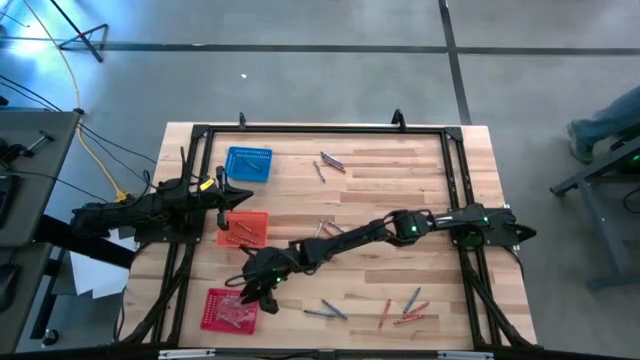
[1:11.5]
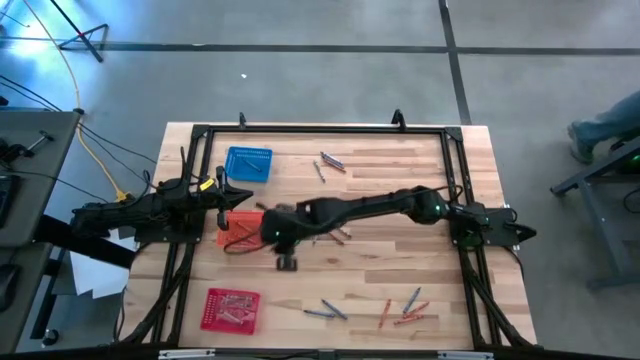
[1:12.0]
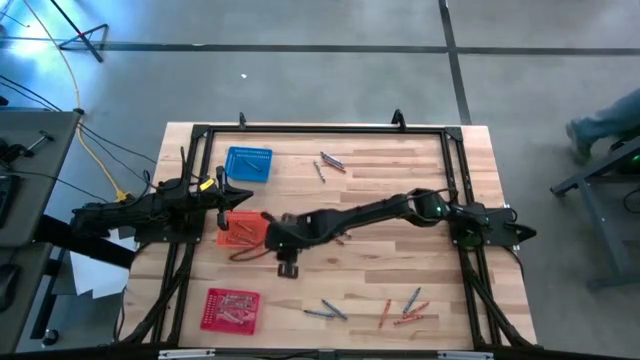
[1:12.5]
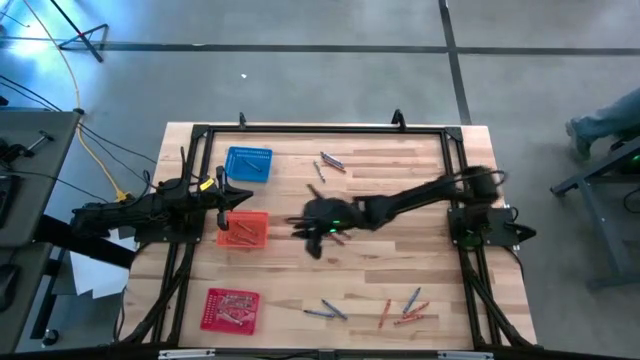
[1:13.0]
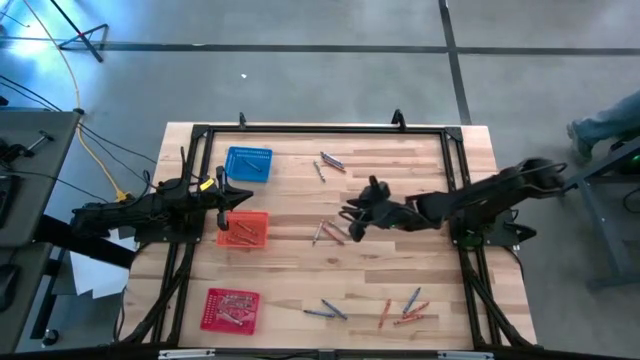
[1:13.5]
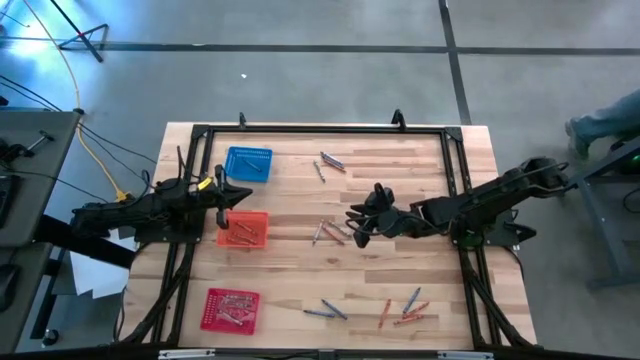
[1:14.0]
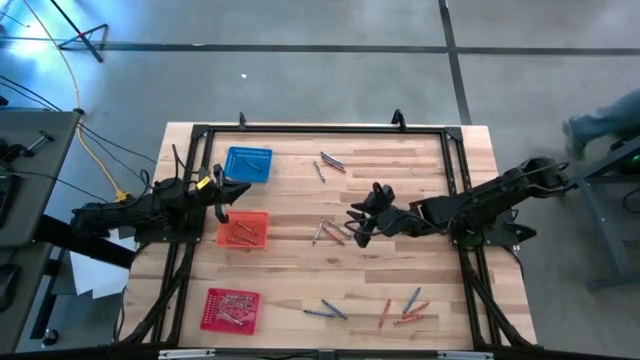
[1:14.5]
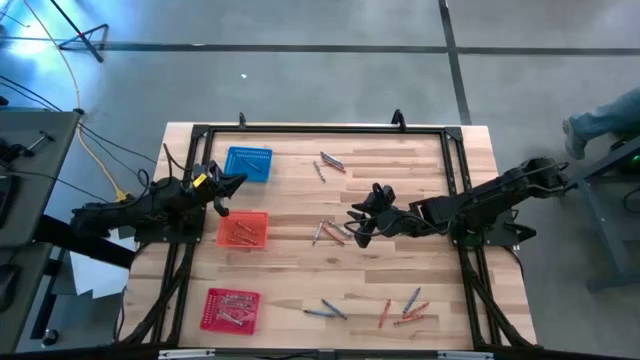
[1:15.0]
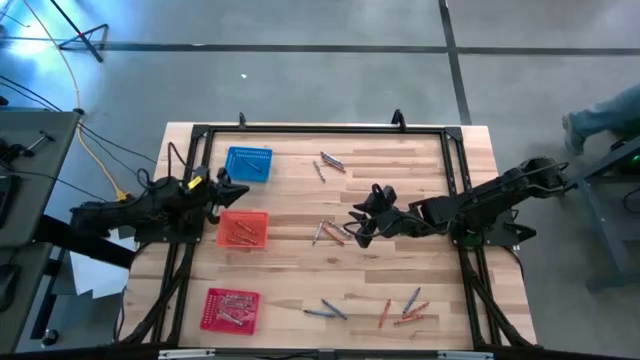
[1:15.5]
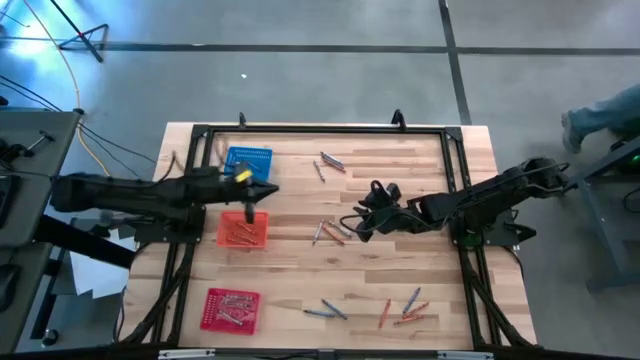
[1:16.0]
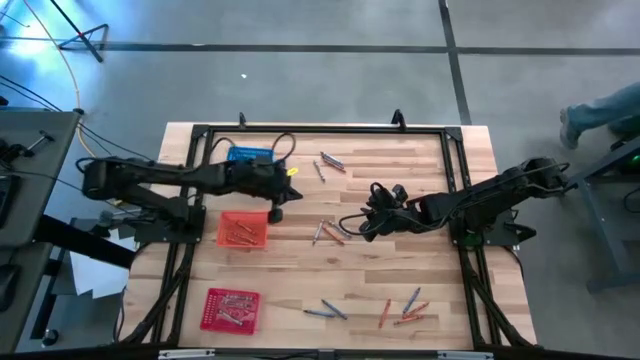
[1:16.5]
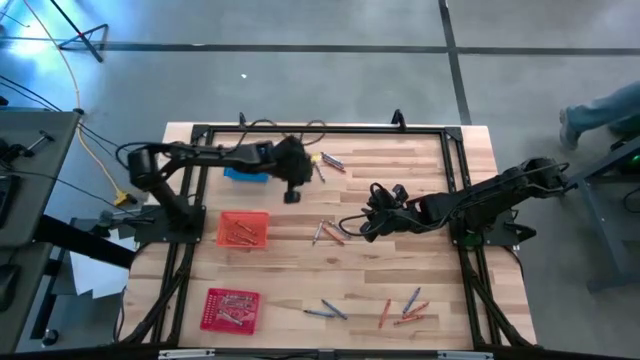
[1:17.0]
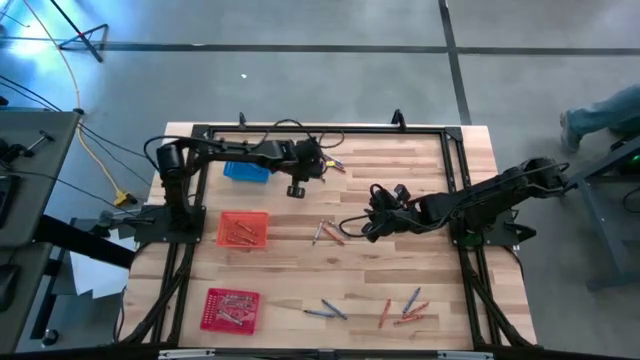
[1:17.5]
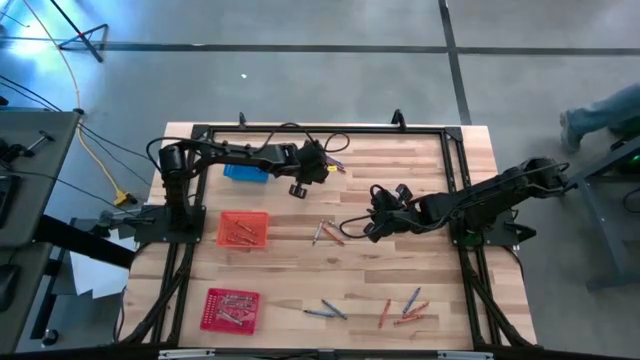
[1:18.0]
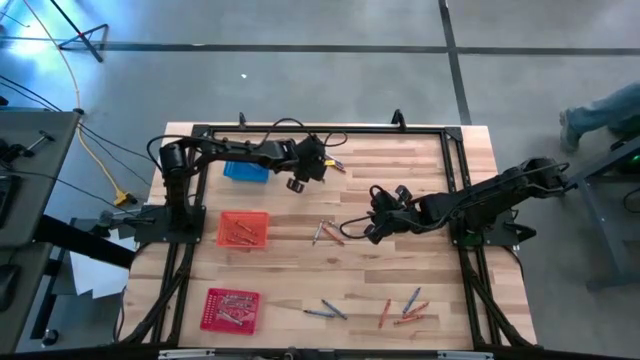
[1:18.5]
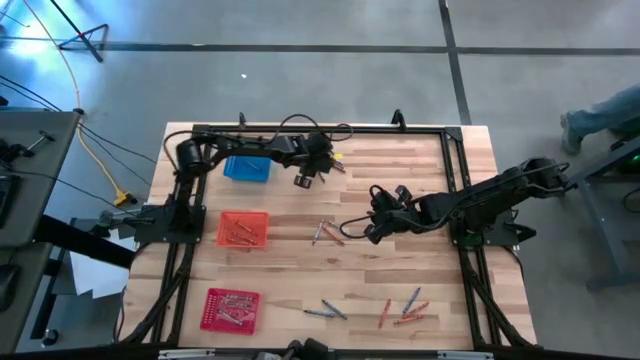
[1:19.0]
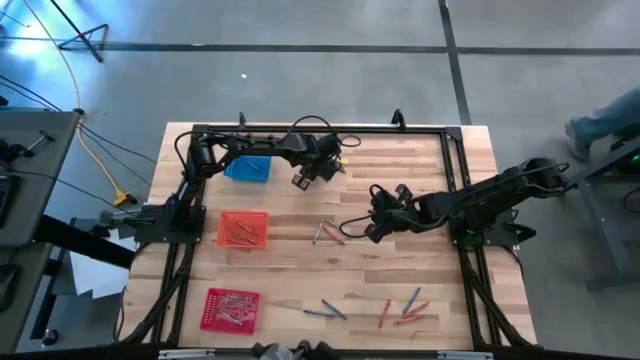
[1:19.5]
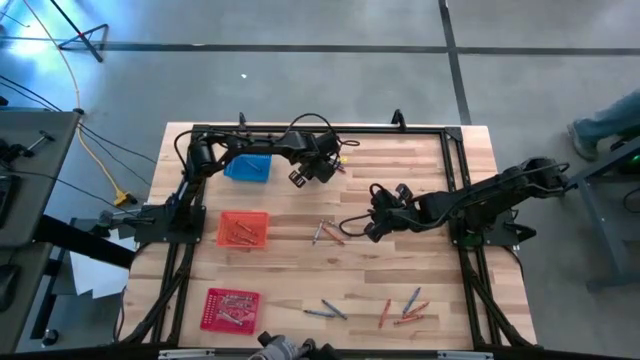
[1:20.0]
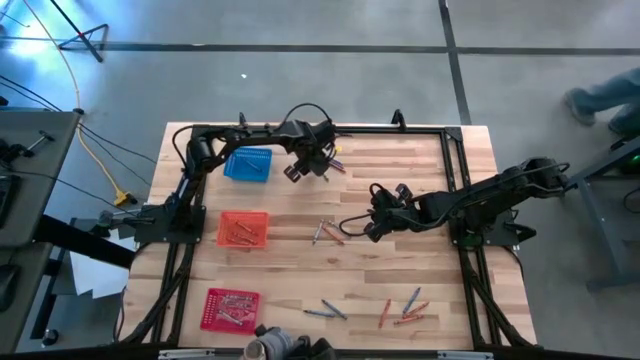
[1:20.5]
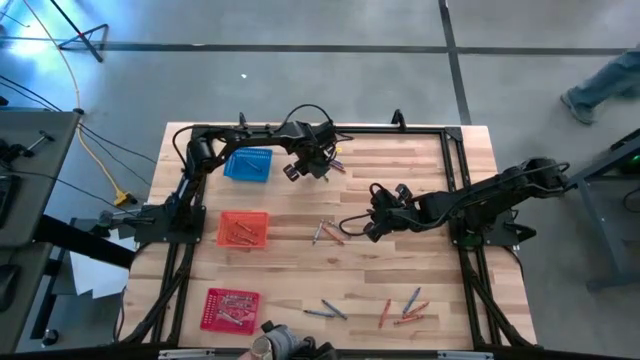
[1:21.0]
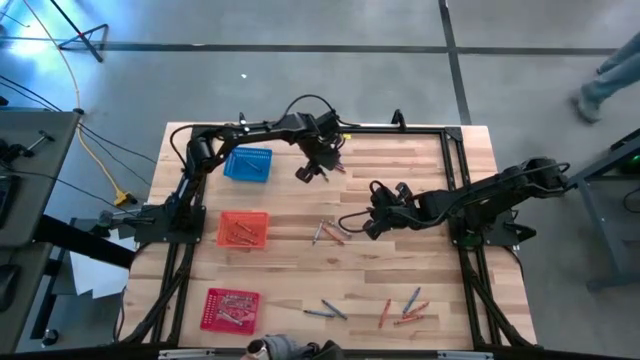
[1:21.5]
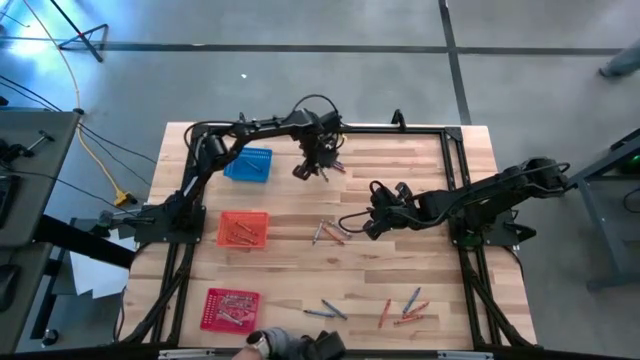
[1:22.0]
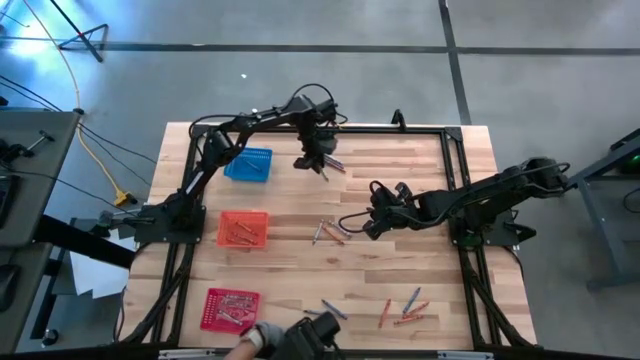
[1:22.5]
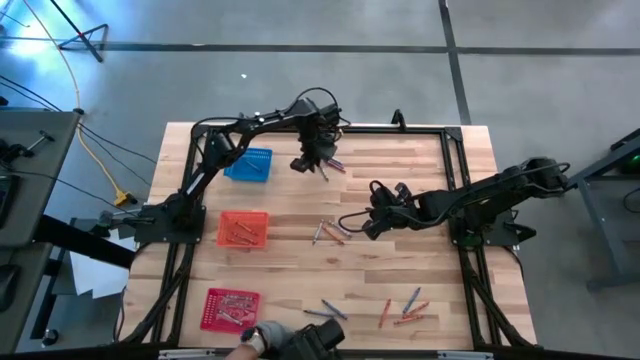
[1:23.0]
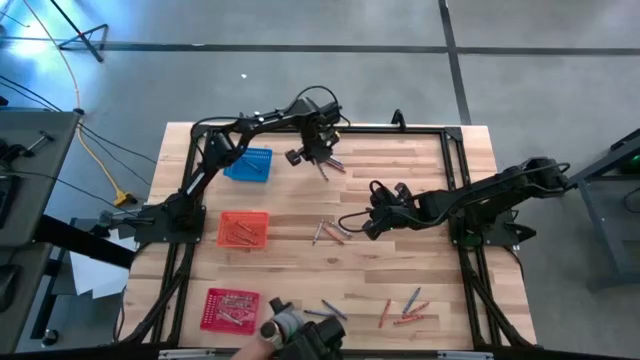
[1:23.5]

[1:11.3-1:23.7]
Task: Sort crayons
Put the gray crayon into the red bin

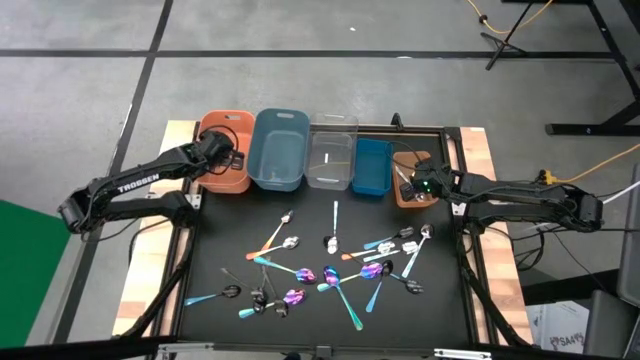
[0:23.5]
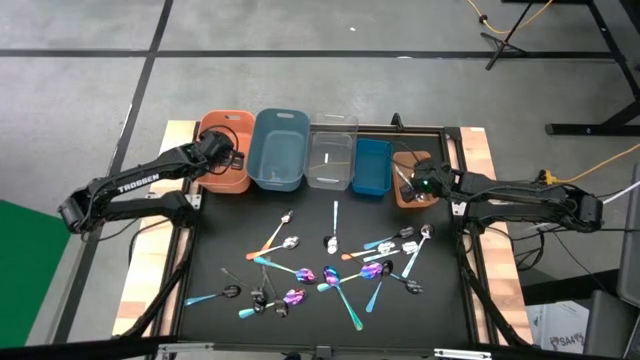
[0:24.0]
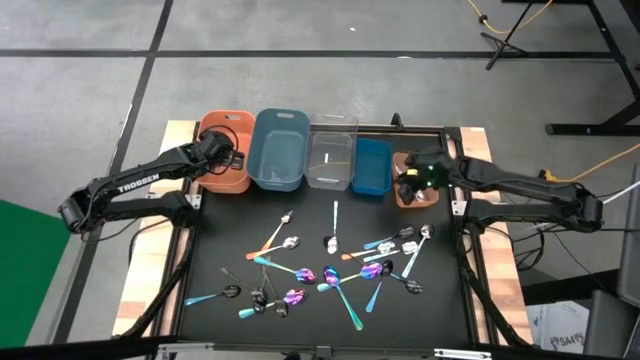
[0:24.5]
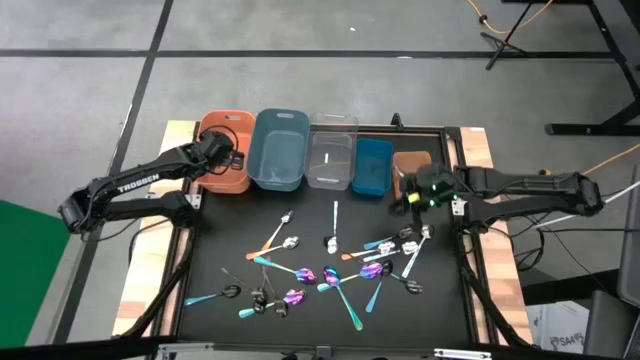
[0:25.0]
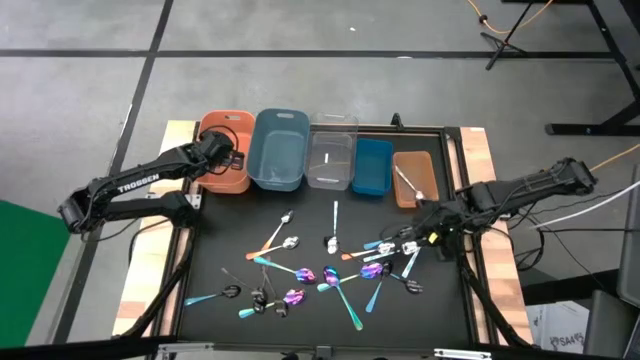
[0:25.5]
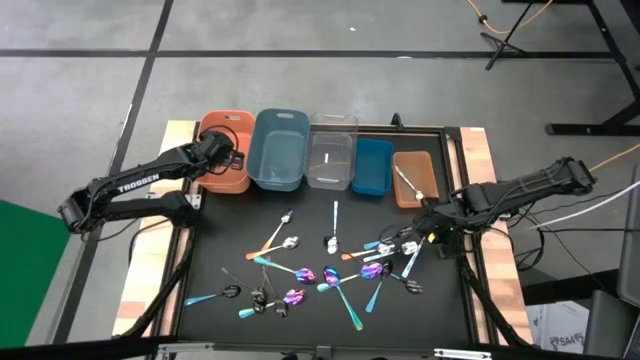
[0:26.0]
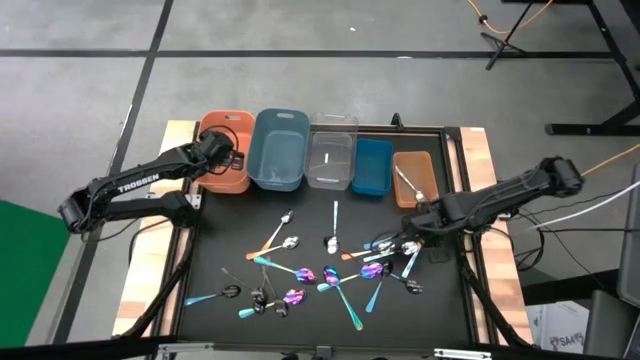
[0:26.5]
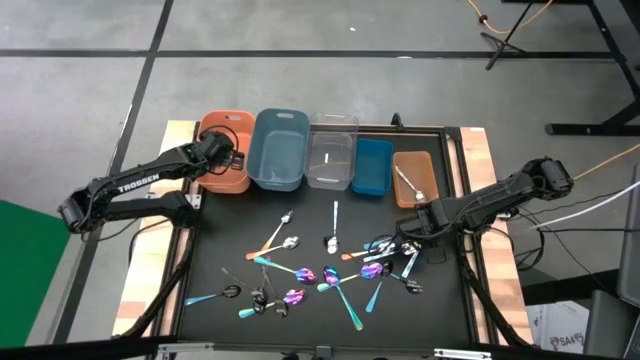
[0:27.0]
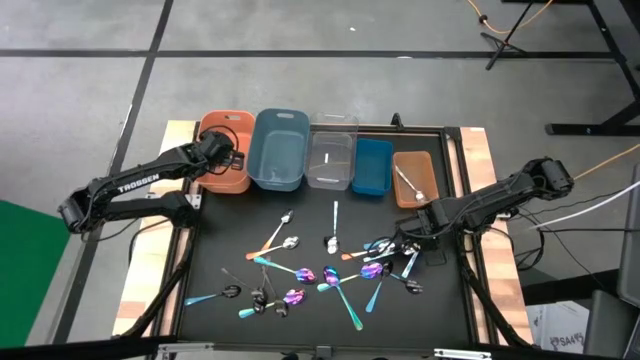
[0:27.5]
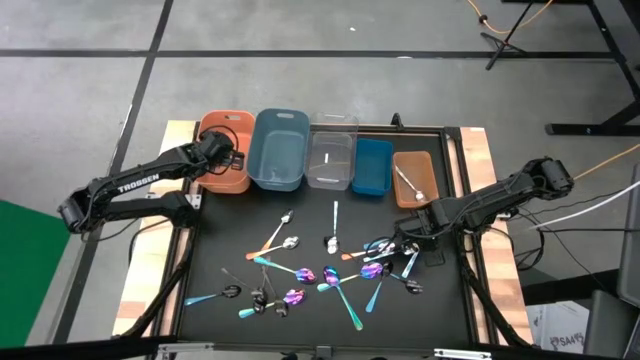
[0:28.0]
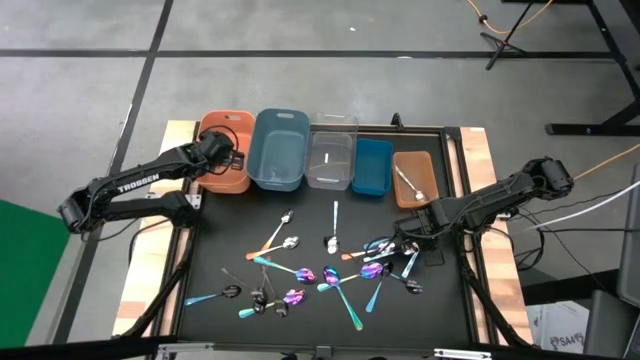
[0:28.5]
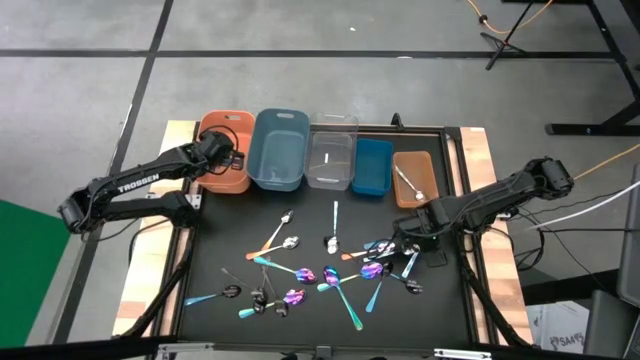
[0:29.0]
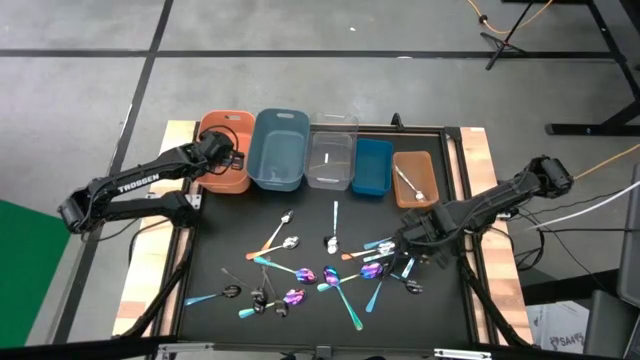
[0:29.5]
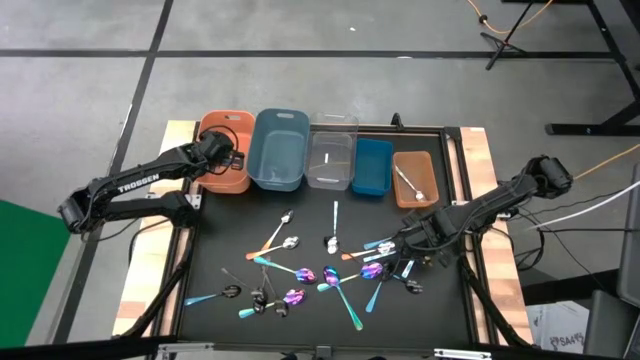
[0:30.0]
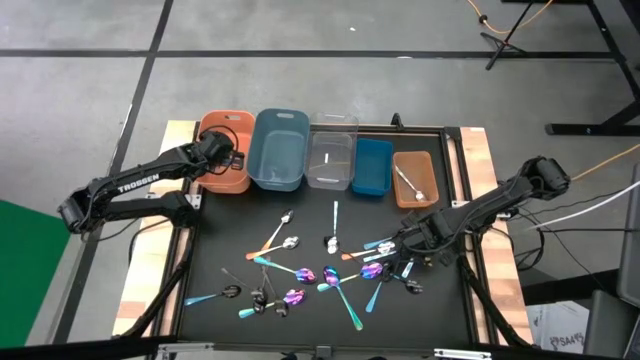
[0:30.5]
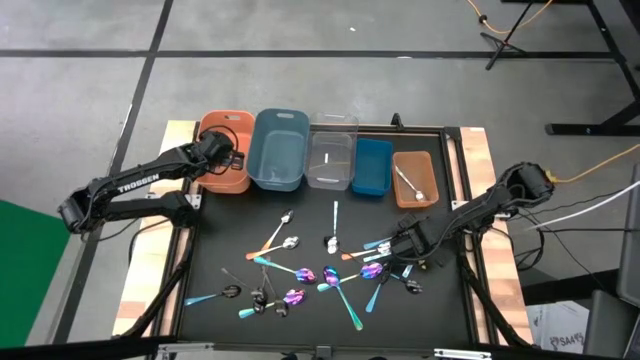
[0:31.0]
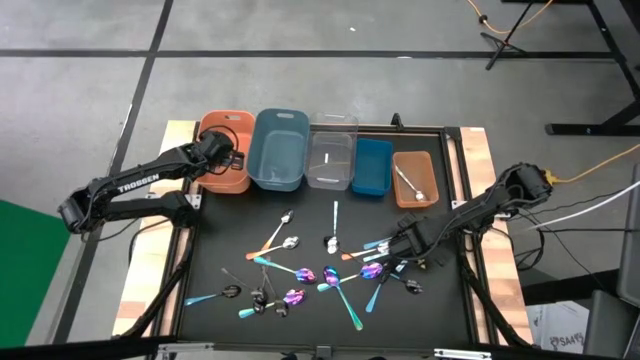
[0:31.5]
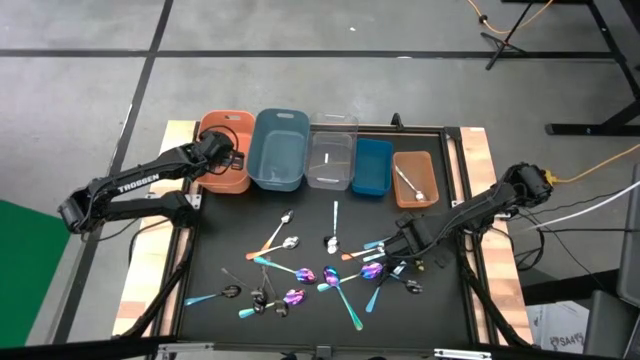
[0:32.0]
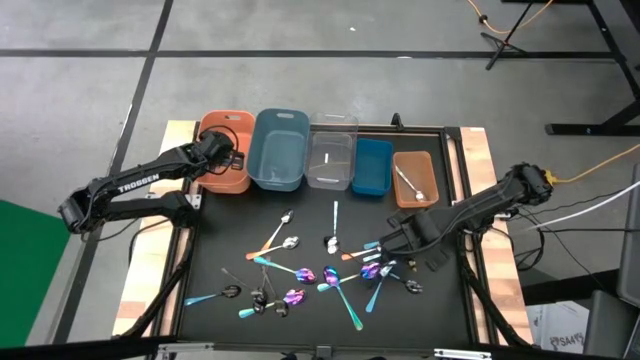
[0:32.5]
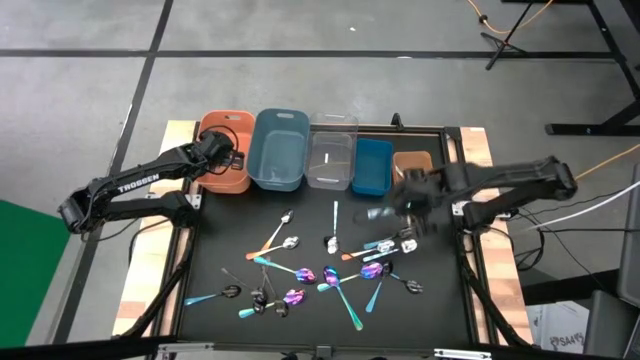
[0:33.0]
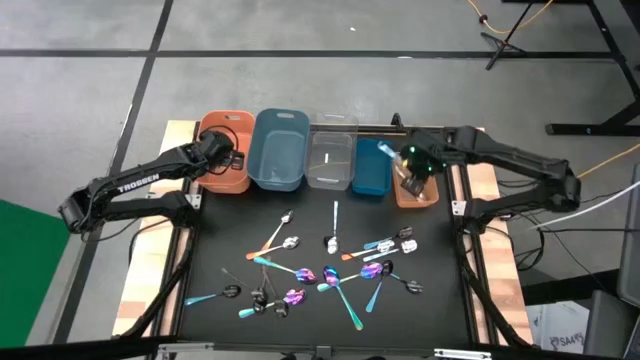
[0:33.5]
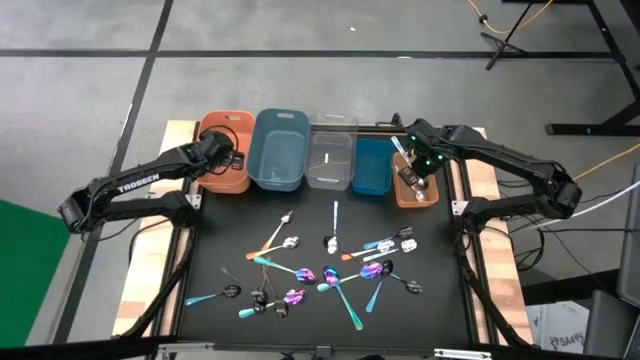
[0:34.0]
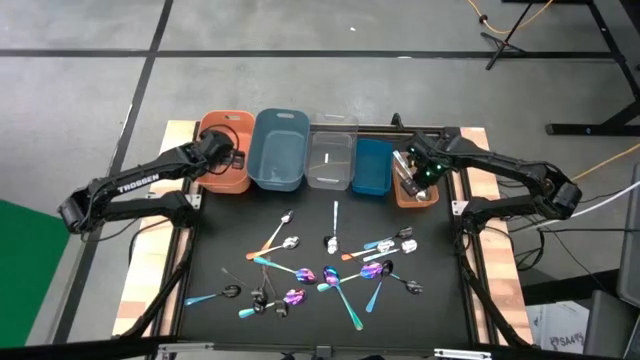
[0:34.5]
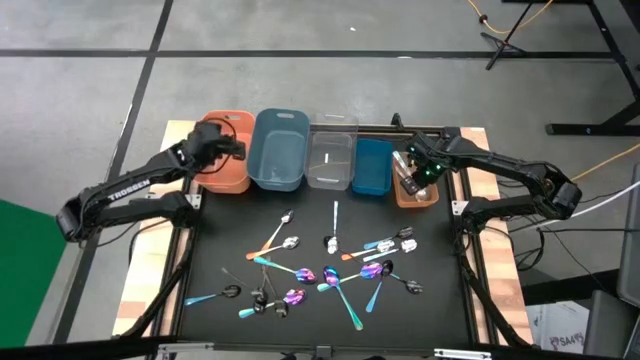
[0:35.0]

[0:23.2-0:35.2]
Task: Sort silverware by color (type)
Put the white and blue spoon into the right orange bin
